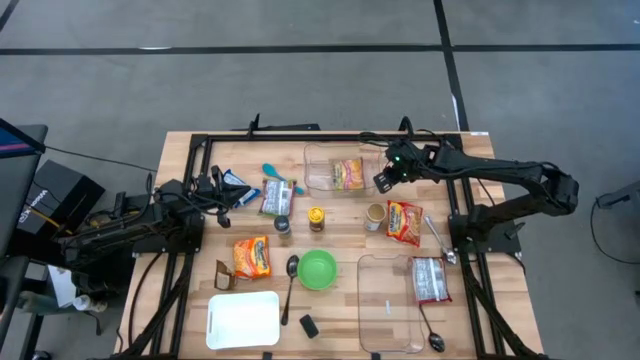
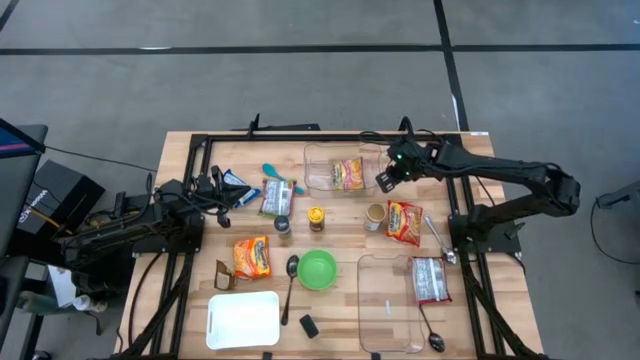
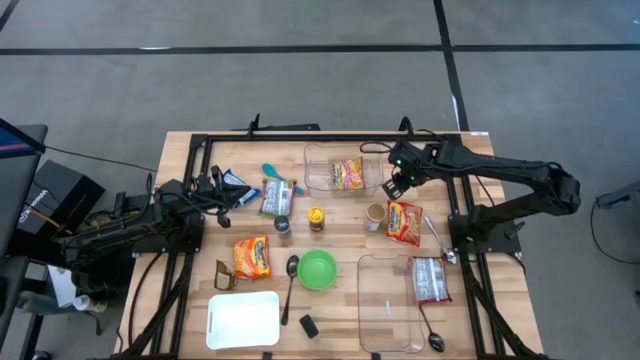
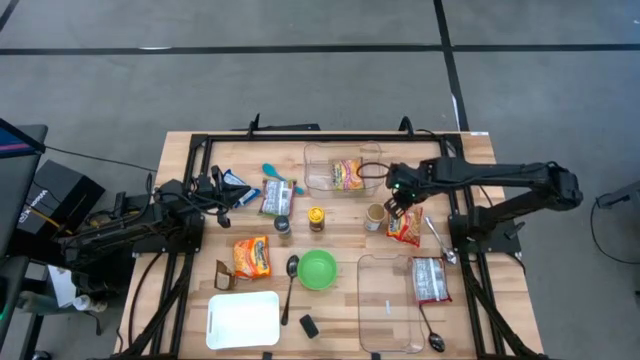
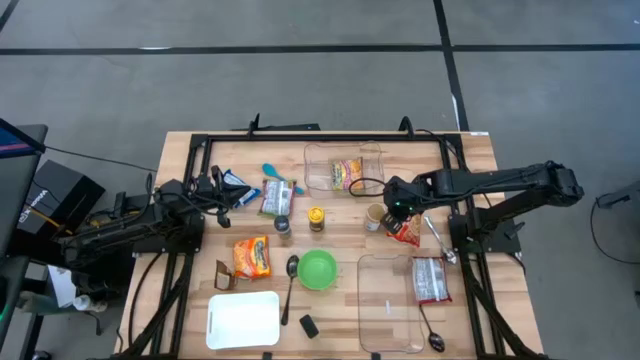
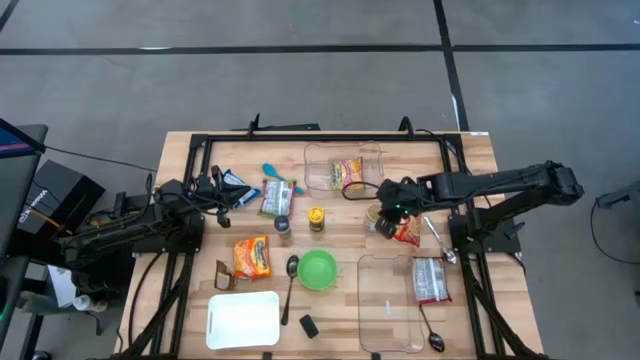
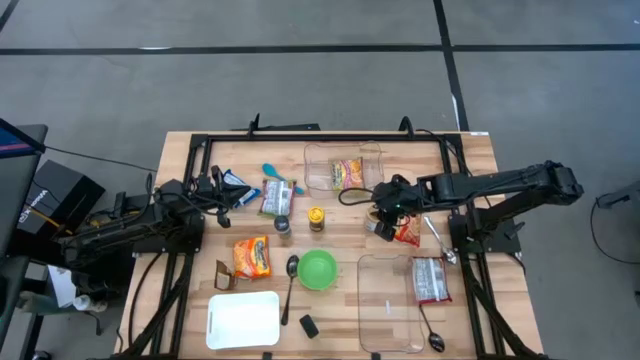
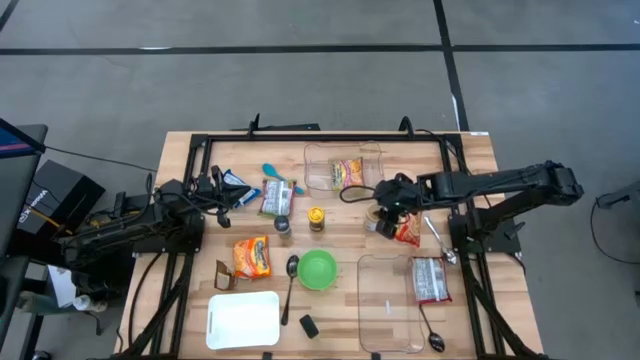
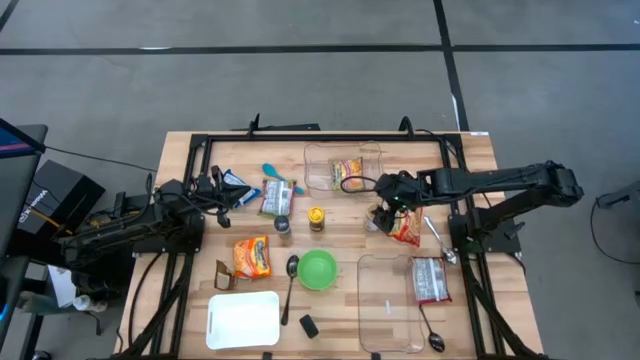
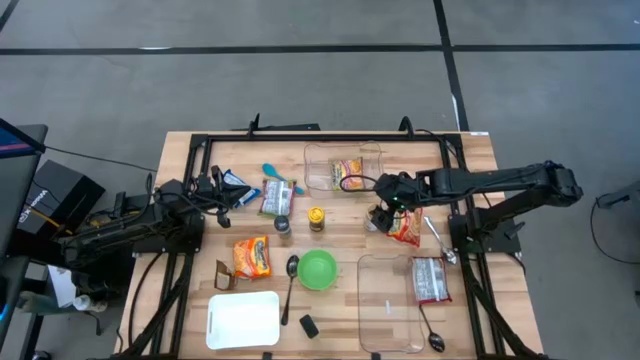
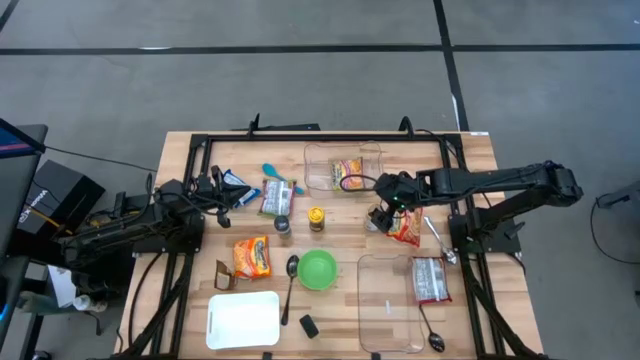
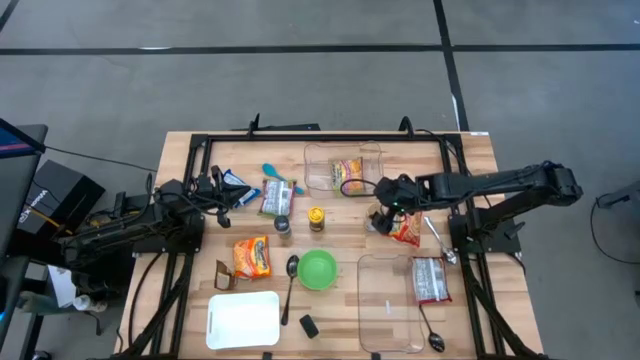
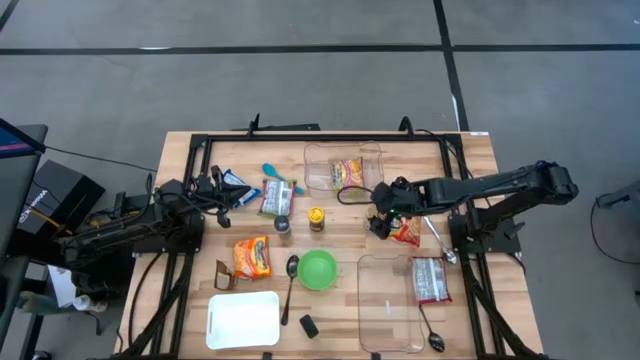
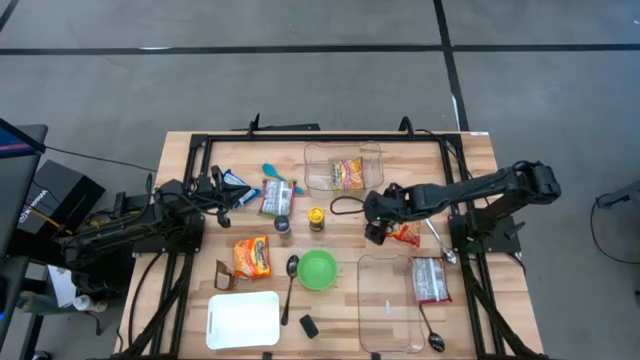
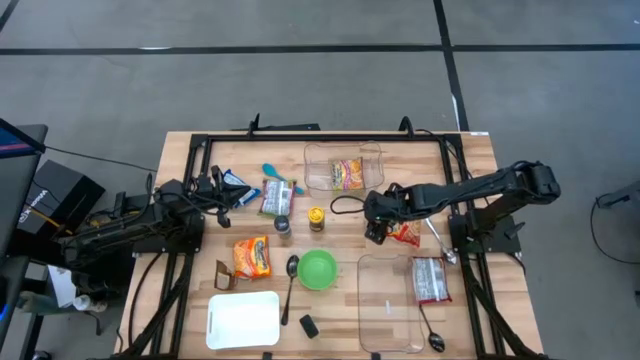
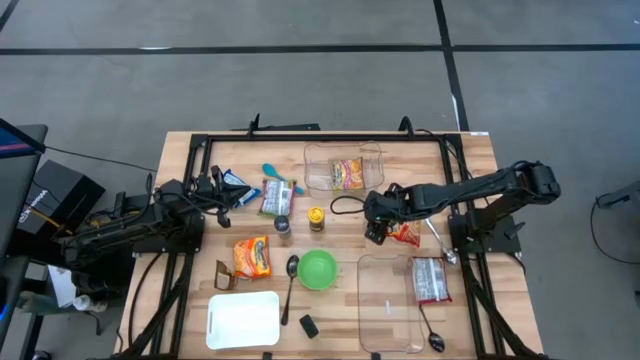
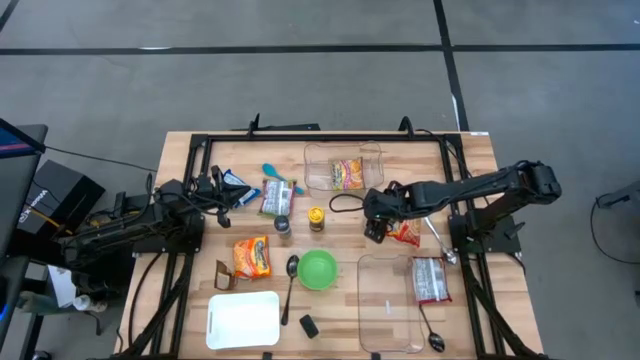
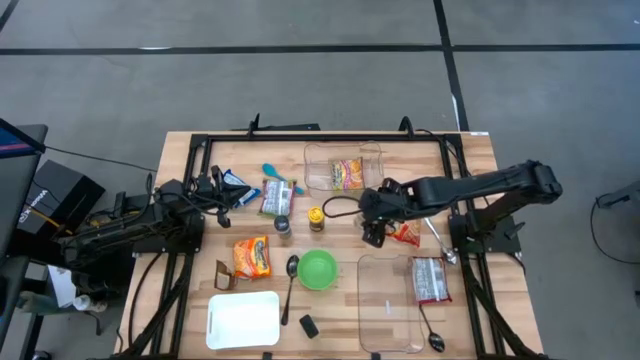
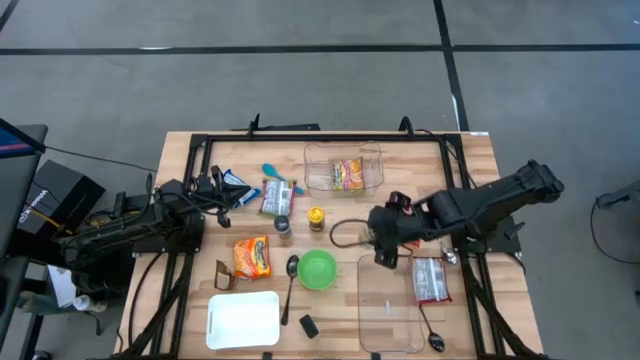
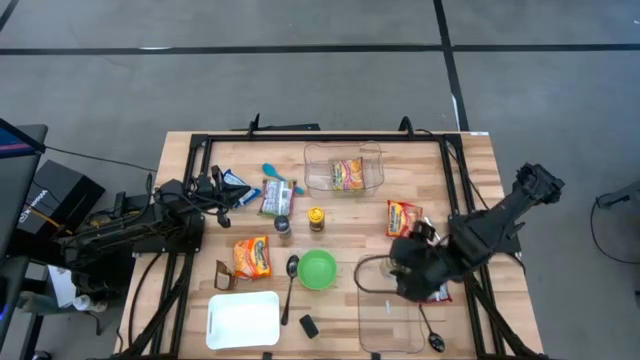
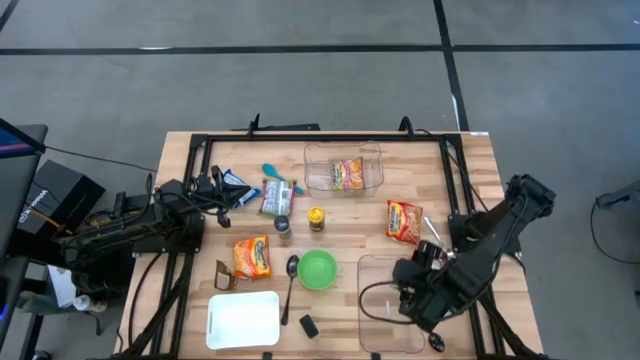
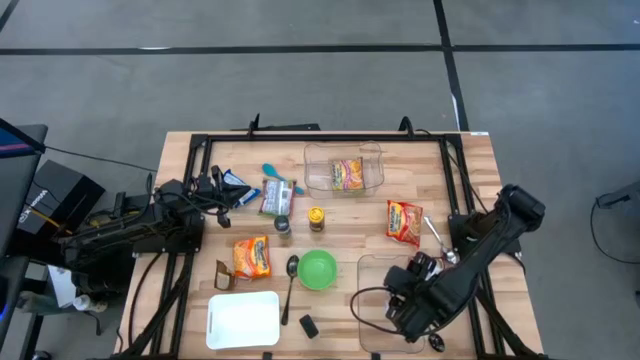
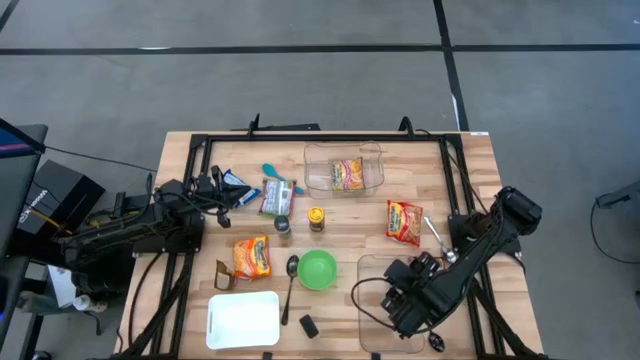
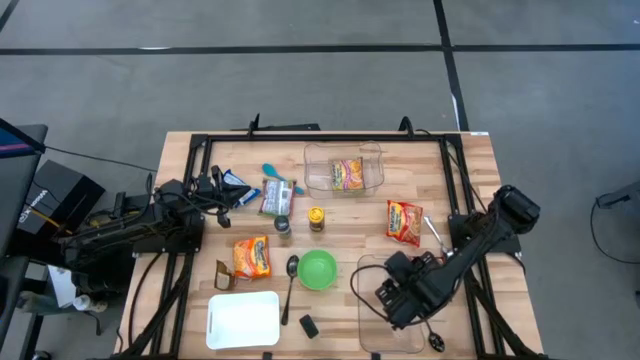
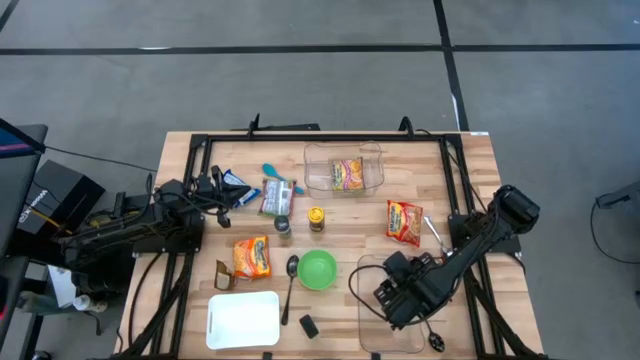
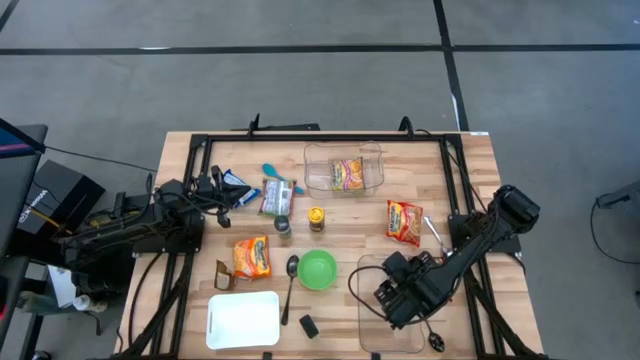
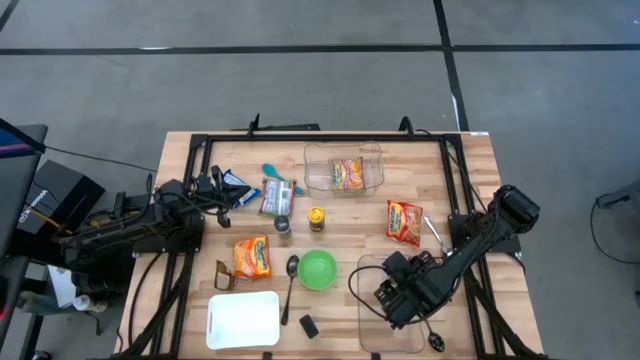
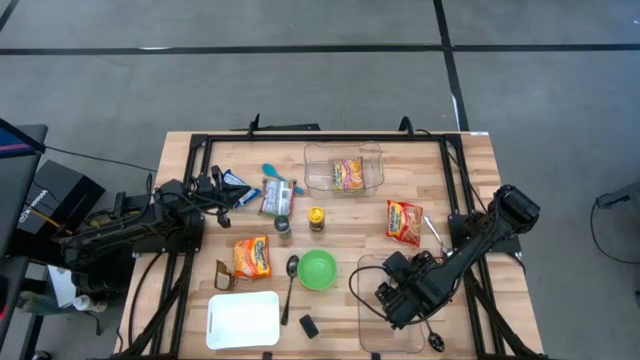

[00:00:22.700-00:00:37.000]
Task: Pick & Place Food Item
Put the gold seasoning into the bottom transparent bin

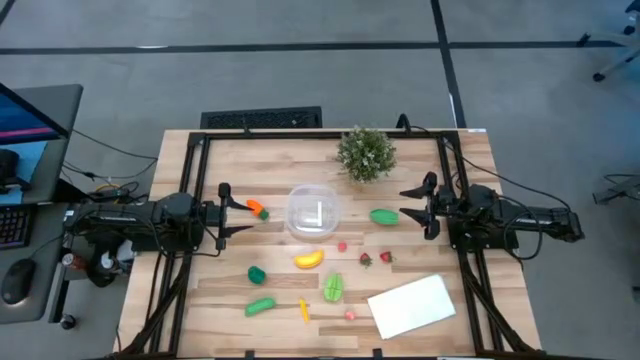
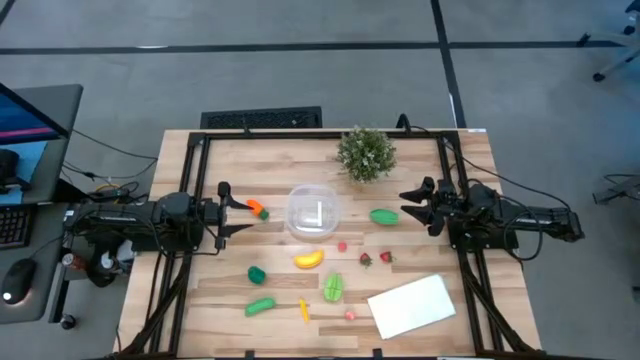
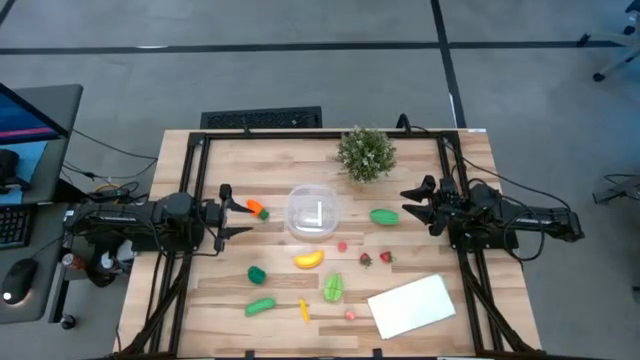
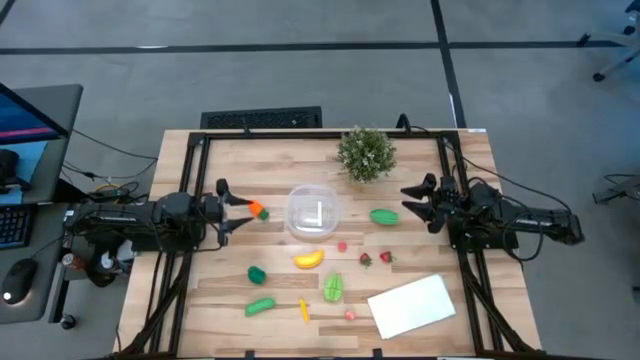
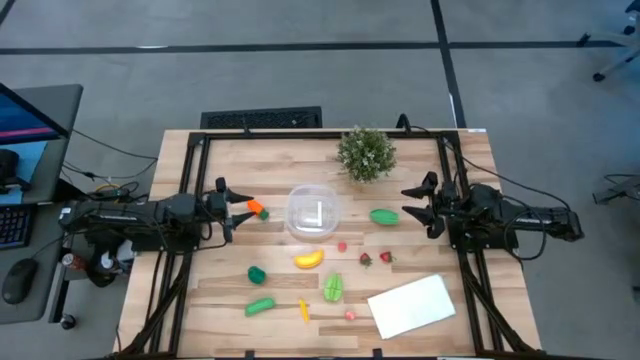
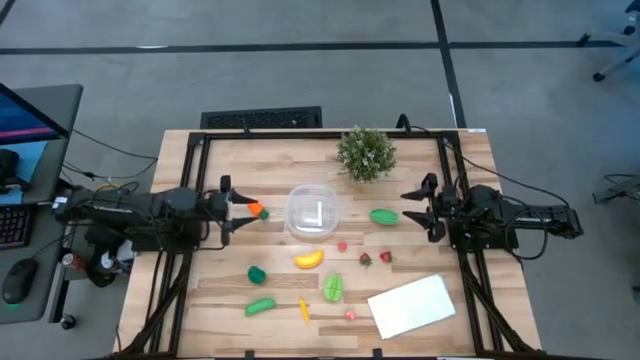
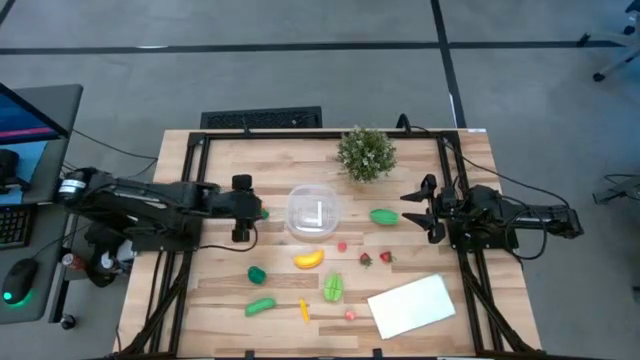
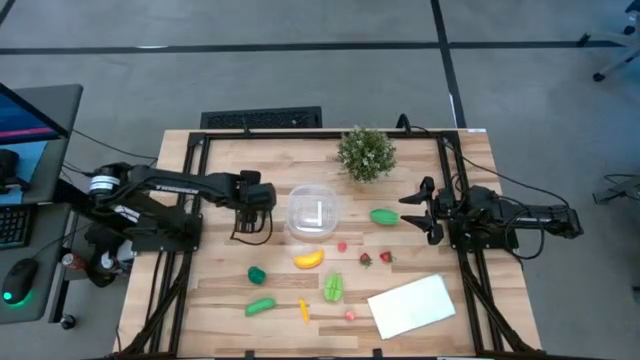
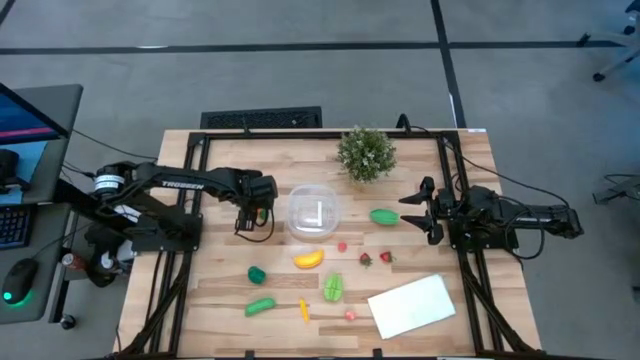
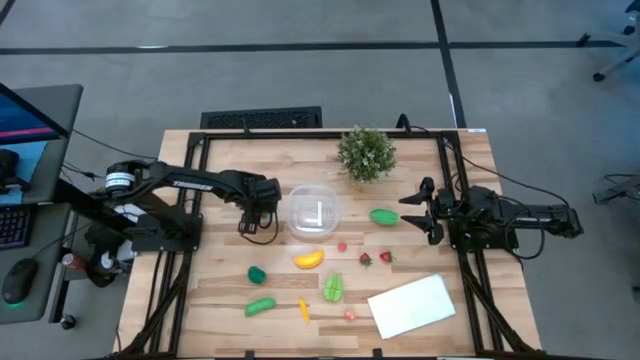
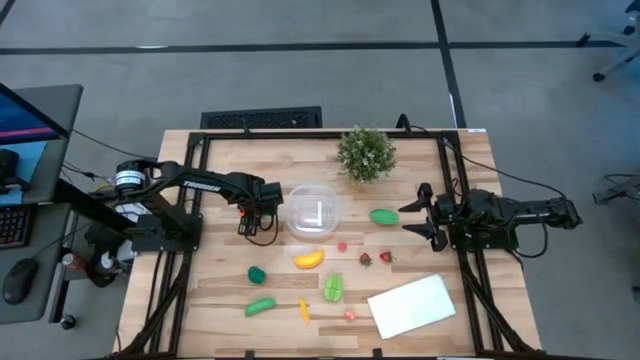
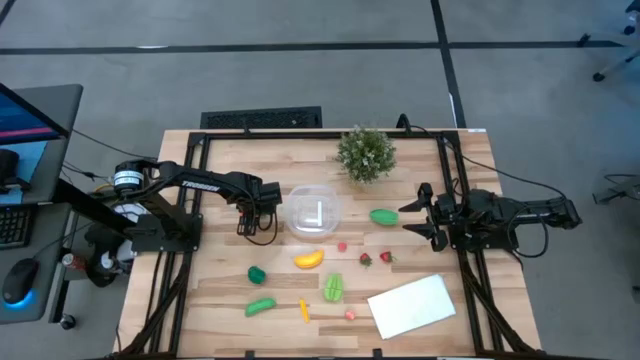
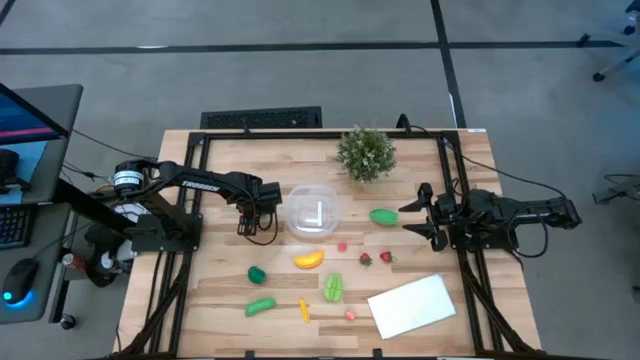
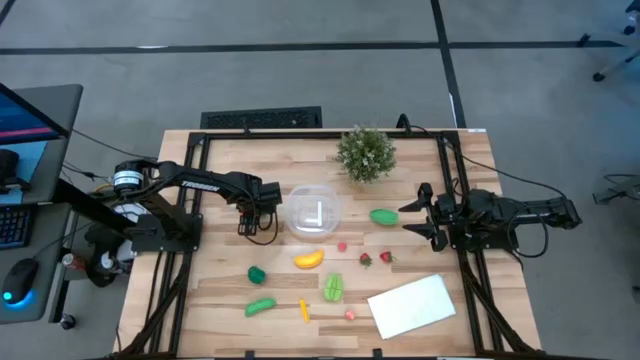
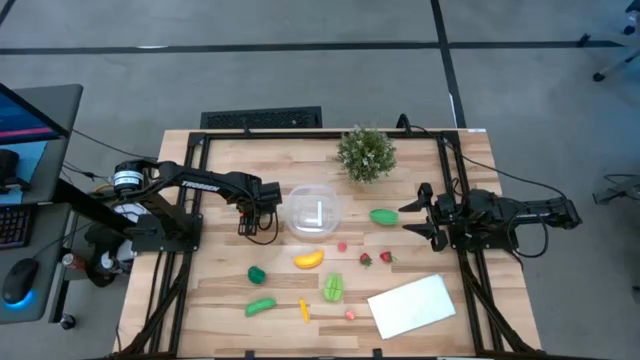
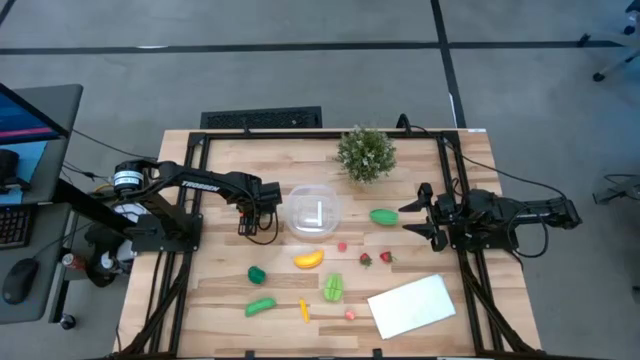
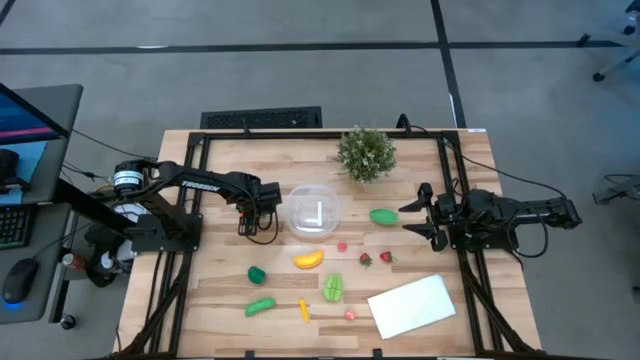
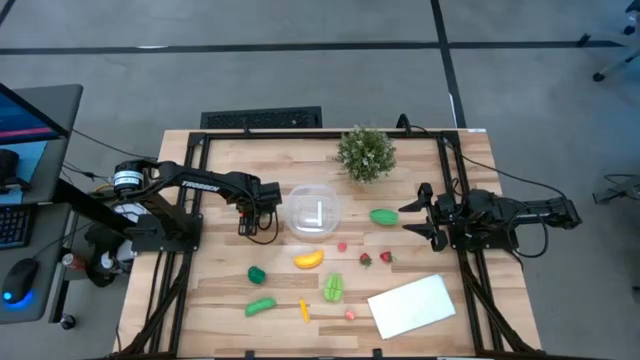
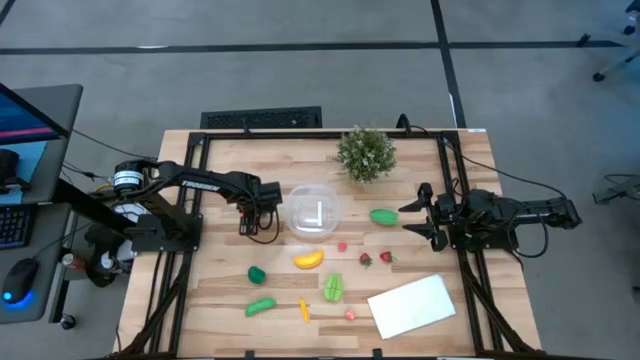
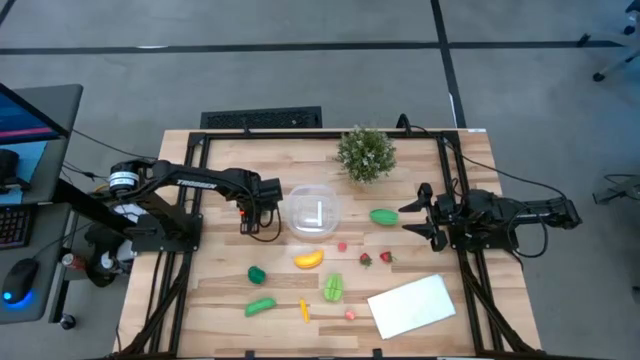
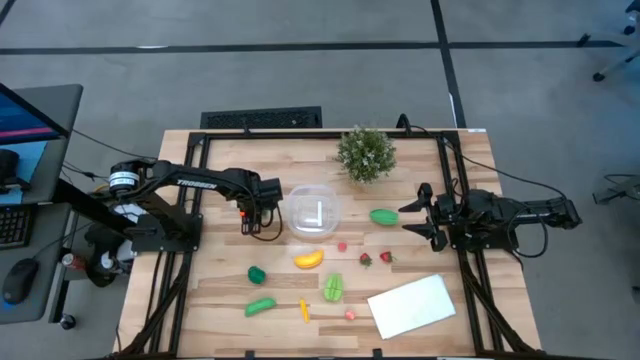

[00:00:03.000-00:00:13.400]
Task: Pick and placing Produce into tupperware
Put the orange carrot into the transparent container
